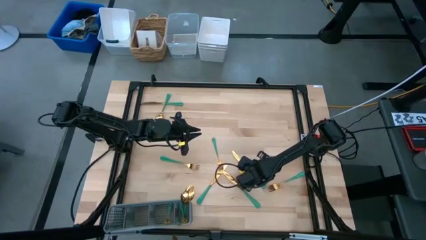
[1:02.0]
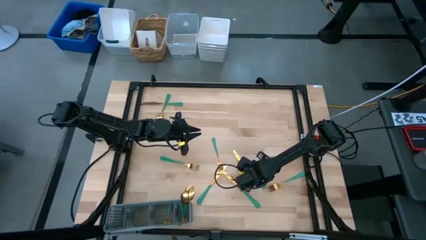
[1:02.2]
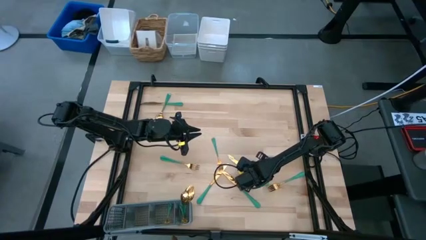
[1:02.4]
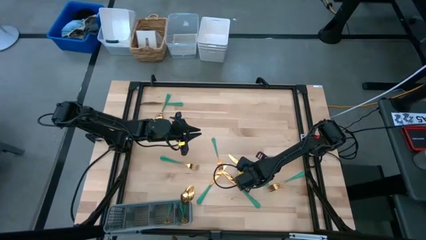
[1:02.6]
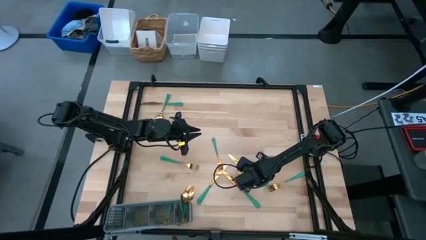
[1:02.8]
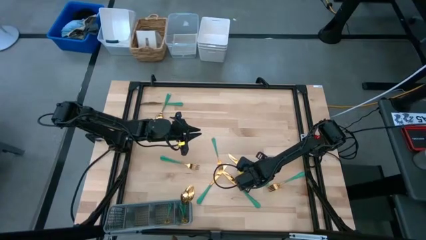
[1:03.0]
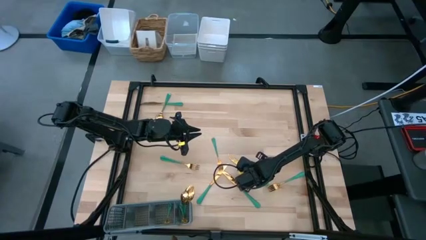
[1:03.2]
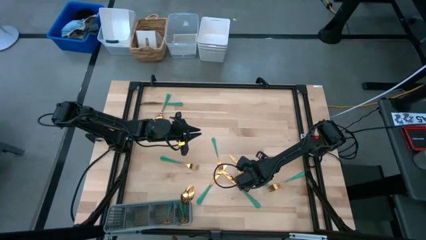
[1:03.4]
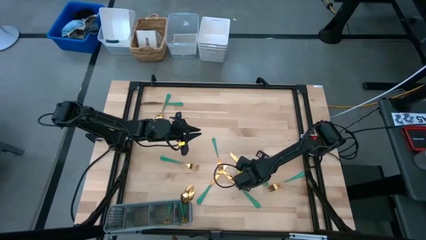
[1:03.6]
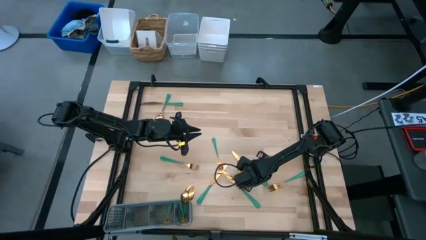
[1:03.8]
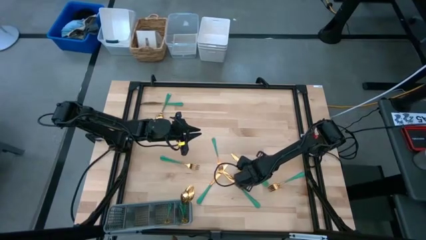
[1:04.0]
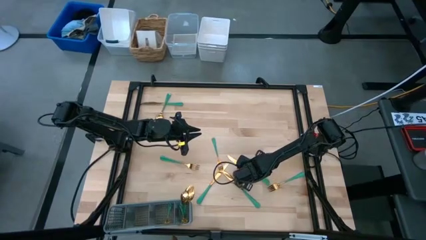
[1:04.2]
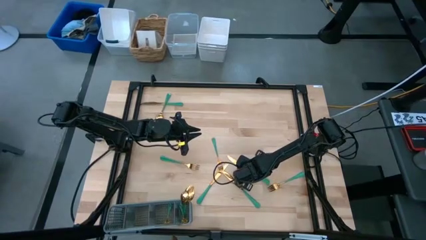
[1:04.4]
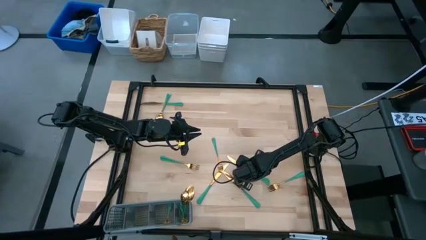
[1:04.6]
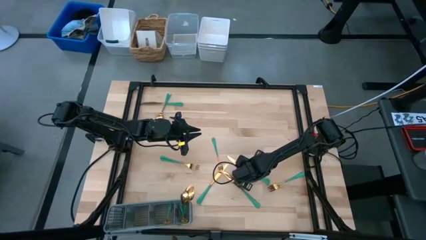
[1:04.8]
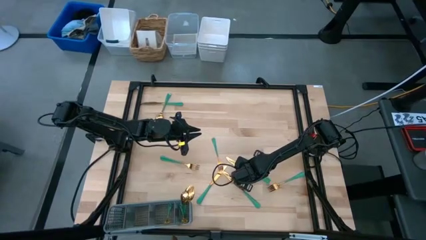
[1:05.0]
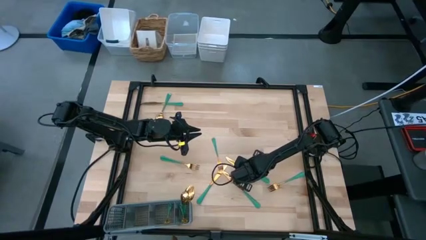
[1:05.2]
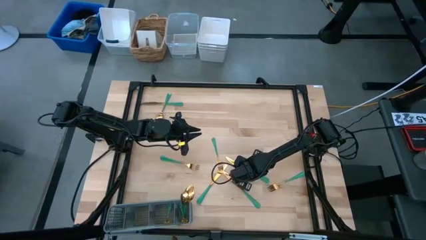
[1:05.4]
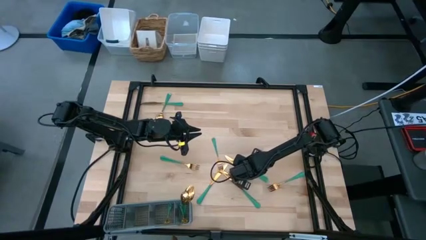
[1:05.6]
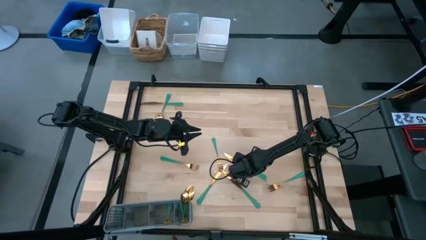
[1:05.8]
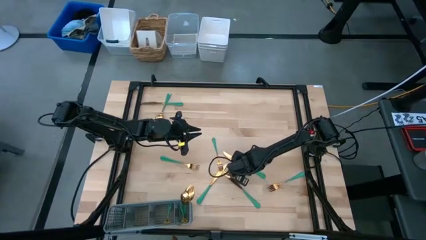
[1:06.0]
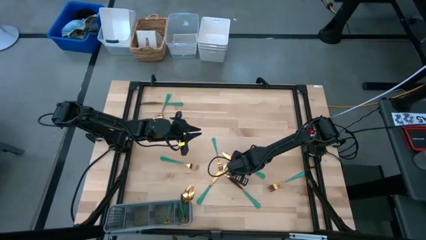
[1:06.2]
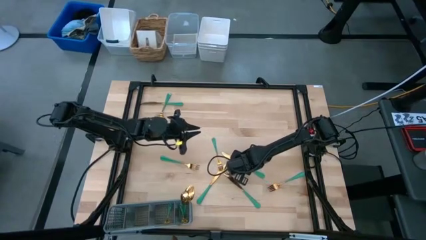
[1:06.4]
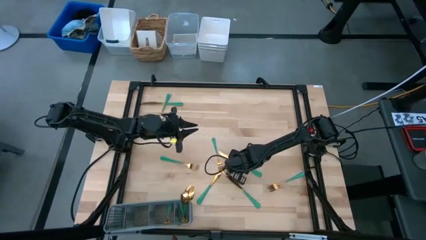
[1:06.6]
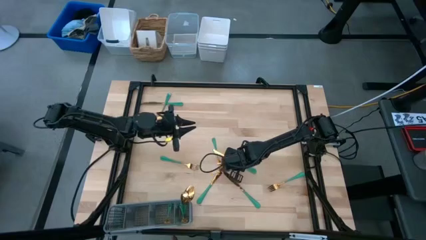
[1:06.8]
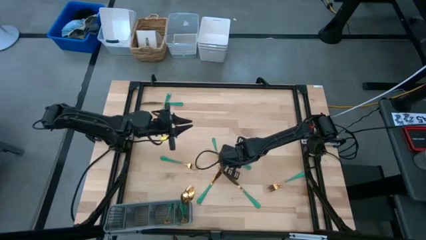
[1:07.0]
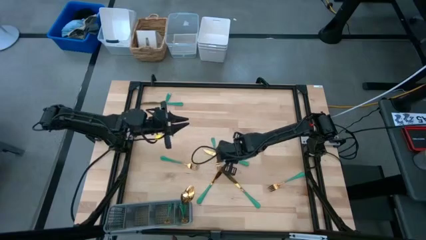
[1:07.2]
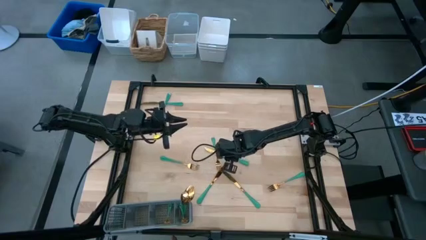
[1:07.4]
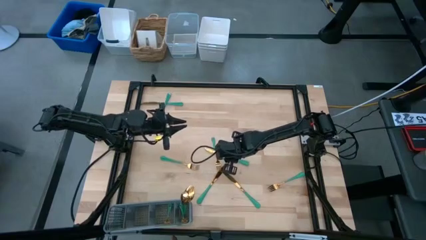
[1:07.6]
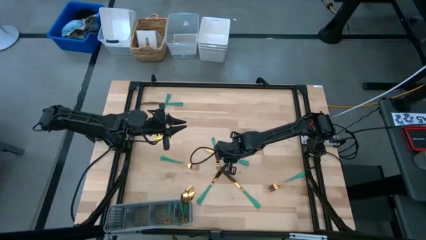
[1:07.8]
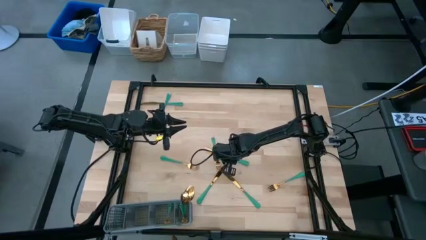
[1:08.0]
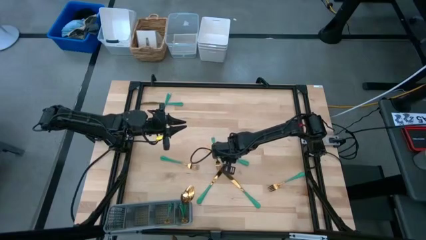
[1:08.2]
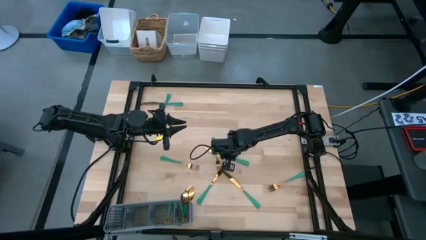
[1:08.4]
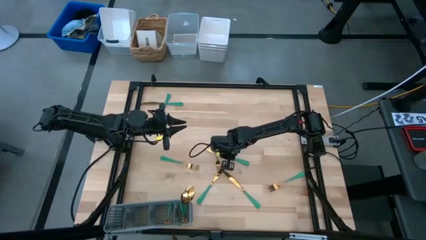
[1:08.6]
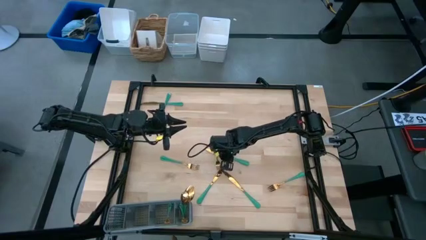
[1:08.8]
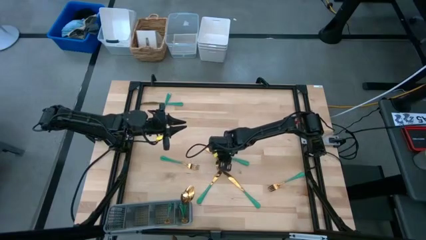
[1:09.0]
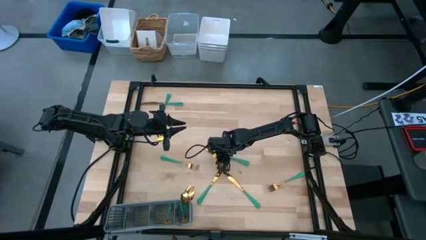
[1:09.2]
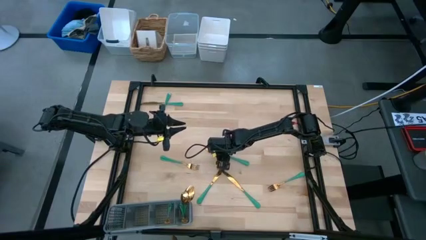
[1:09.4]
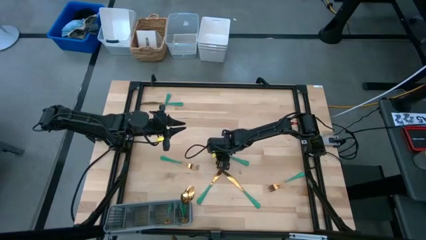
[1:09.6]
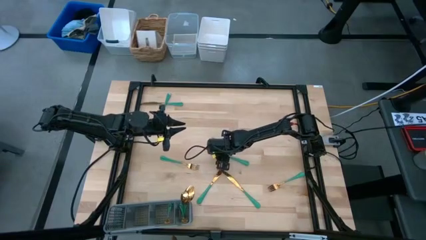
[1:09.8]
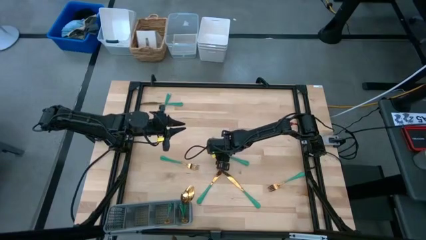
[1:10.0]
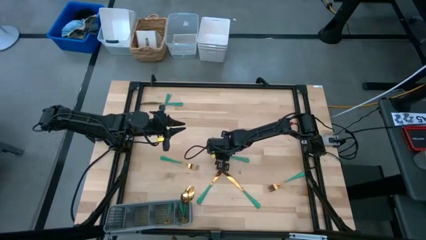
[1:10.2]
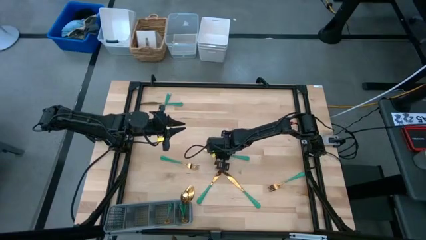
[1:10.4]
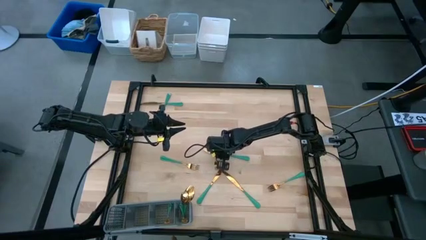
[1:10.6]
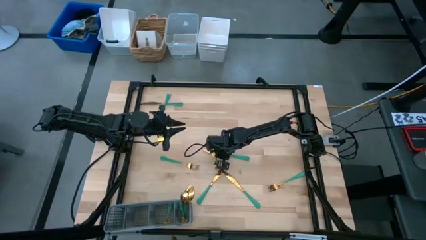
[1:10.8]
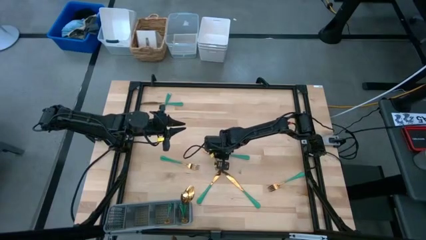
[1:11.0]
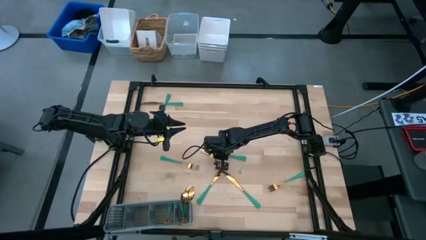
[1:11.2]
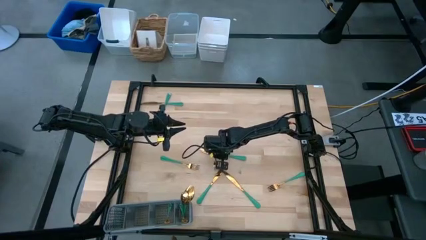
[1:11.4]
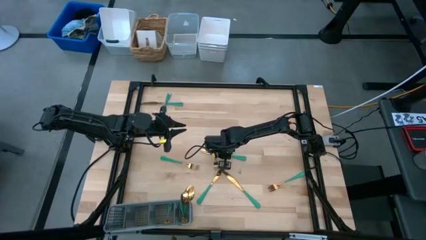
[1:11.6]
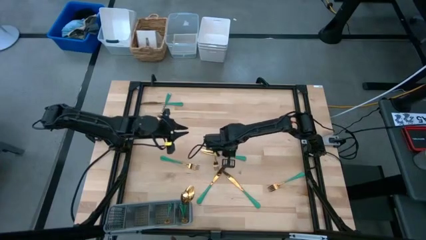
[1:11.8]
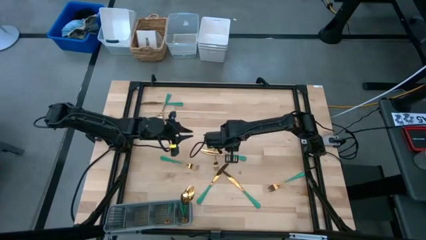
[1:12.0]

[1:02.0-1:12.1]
Task: Sort silverware
Put the right knife into the cutlery rack
